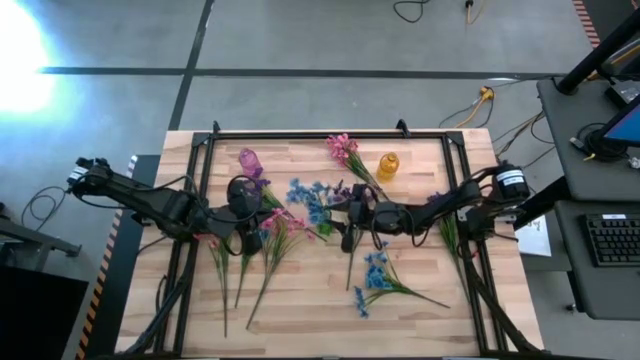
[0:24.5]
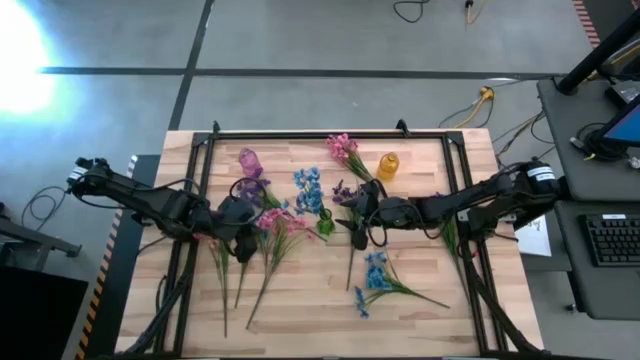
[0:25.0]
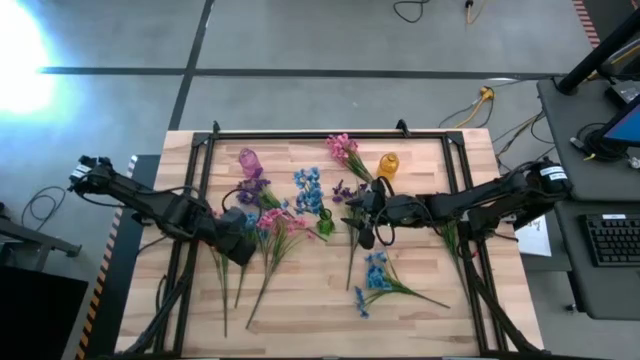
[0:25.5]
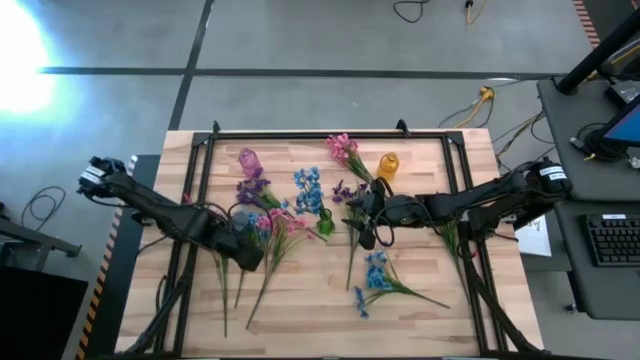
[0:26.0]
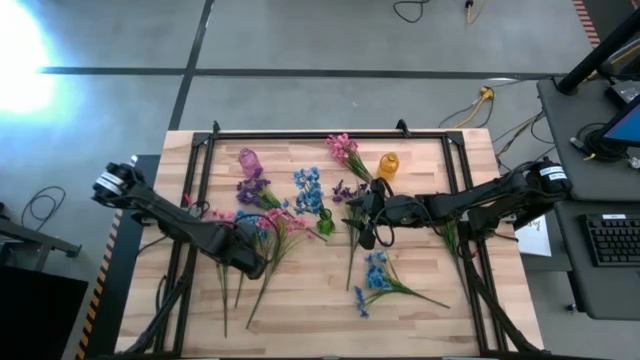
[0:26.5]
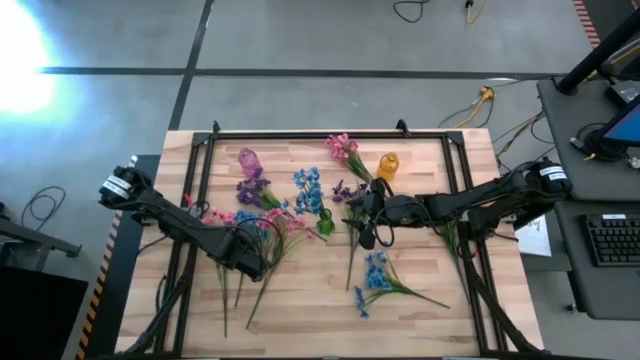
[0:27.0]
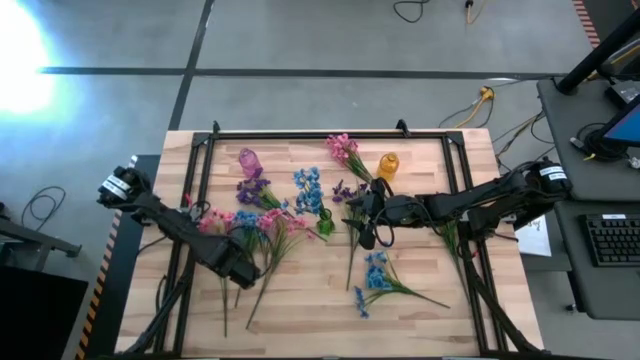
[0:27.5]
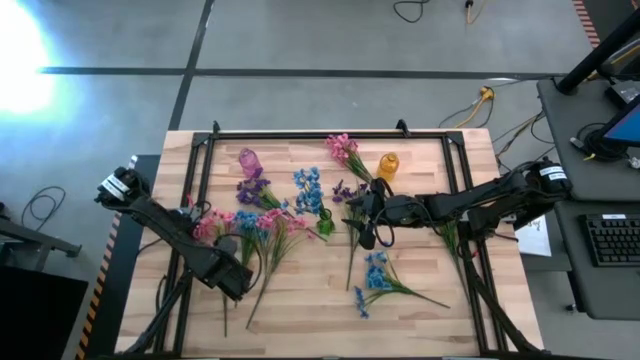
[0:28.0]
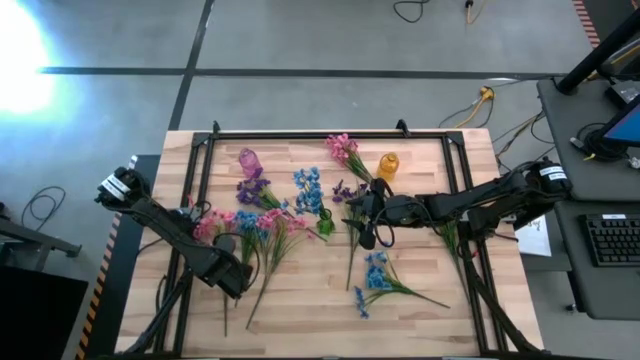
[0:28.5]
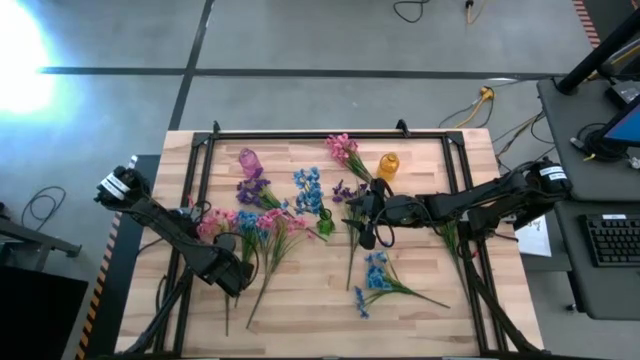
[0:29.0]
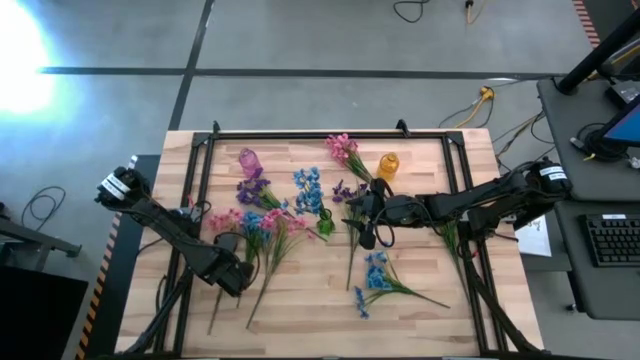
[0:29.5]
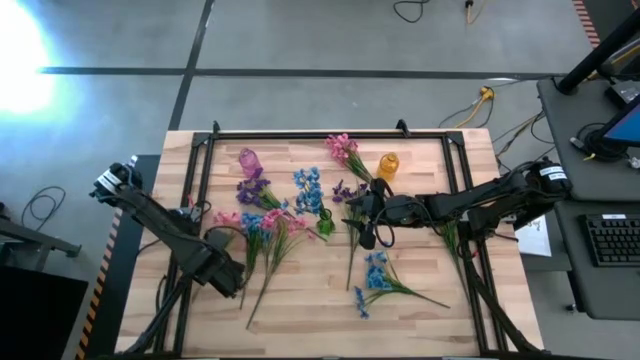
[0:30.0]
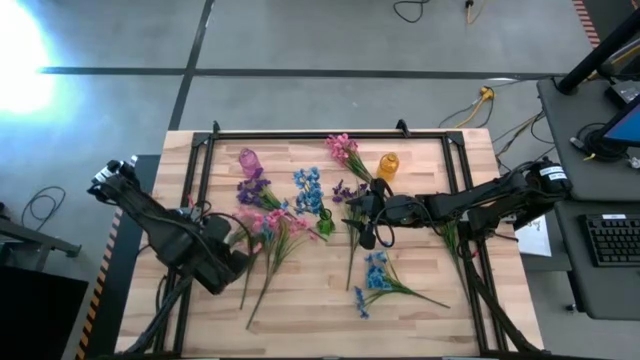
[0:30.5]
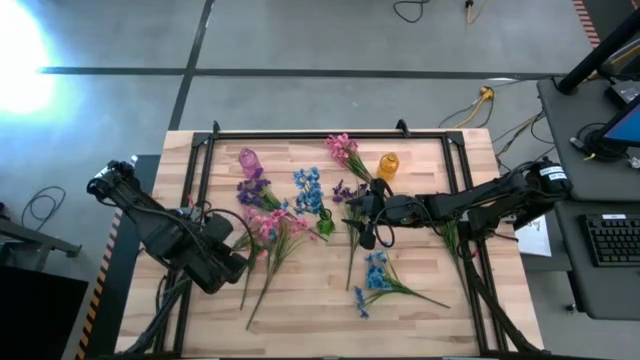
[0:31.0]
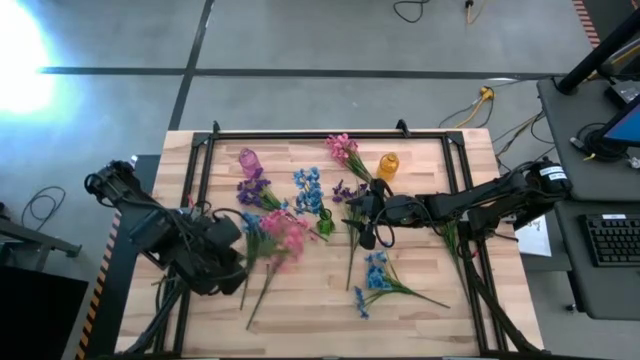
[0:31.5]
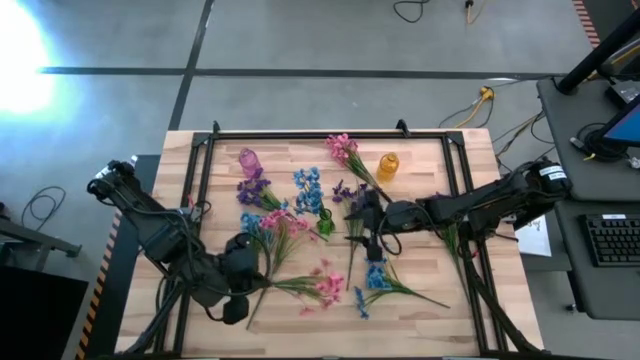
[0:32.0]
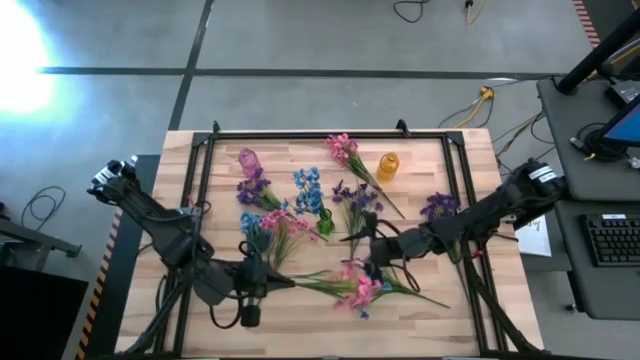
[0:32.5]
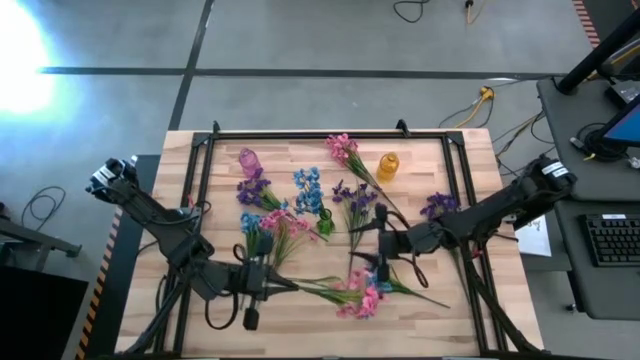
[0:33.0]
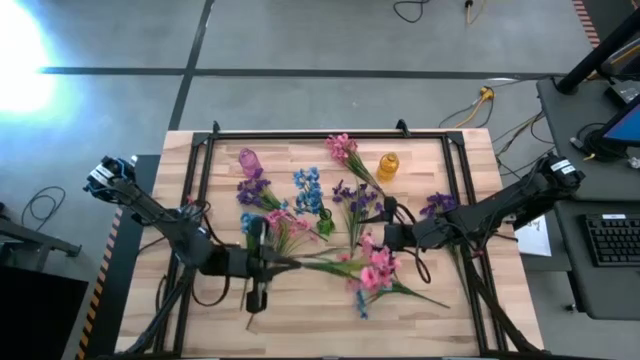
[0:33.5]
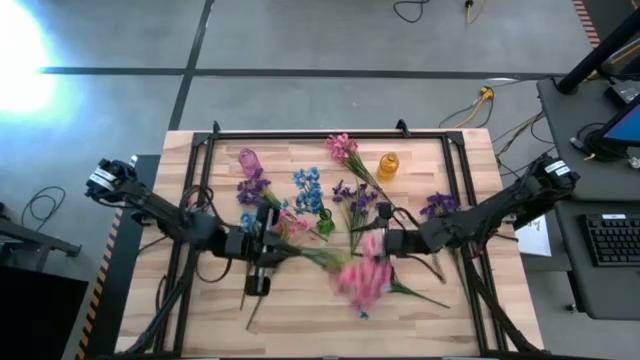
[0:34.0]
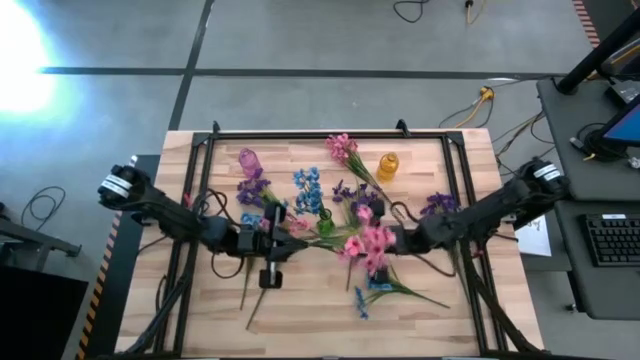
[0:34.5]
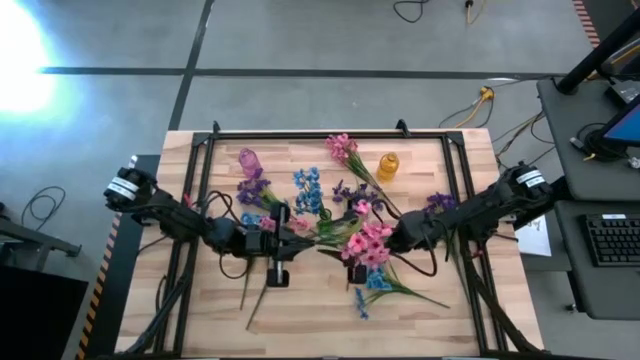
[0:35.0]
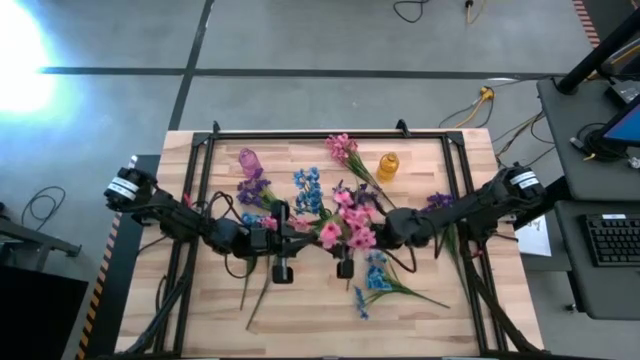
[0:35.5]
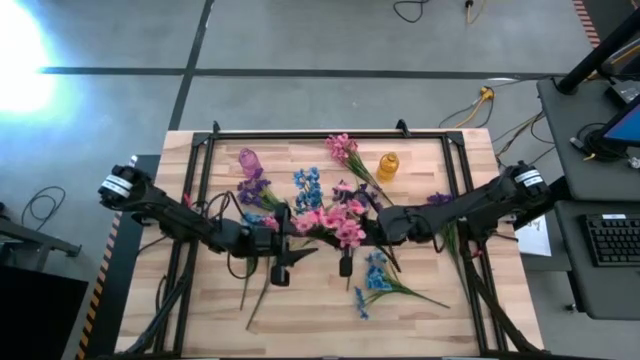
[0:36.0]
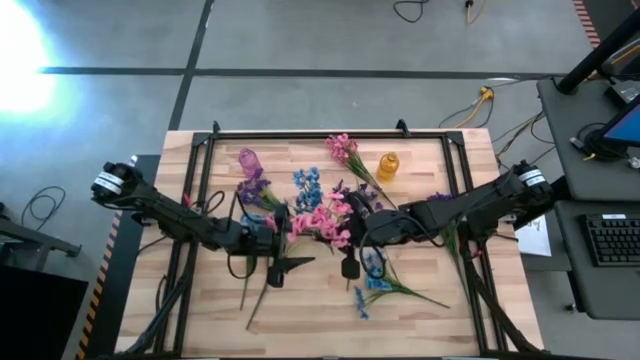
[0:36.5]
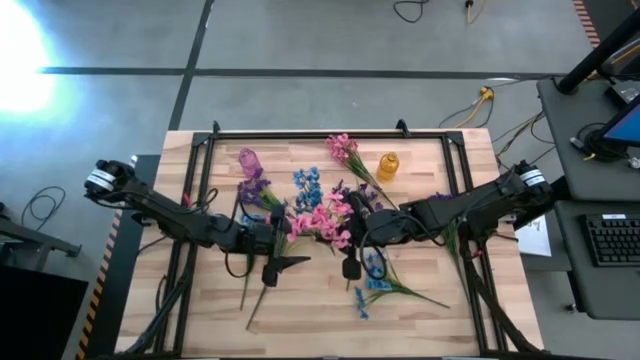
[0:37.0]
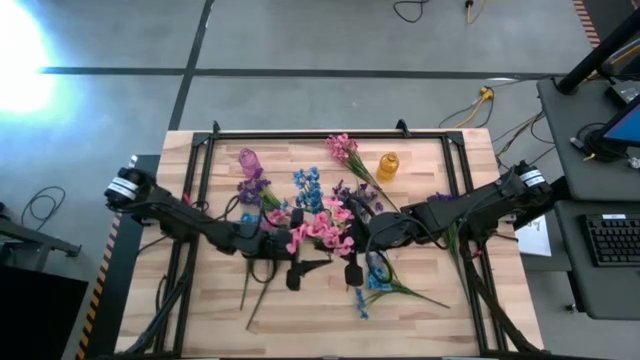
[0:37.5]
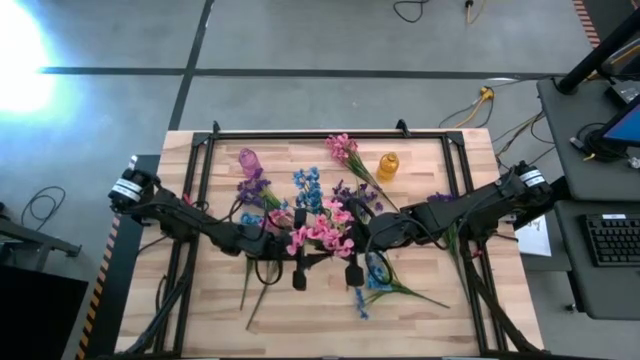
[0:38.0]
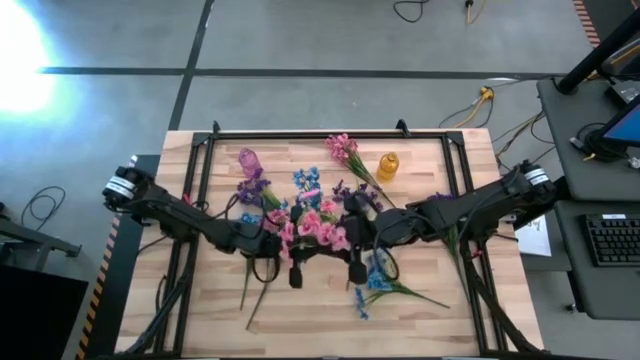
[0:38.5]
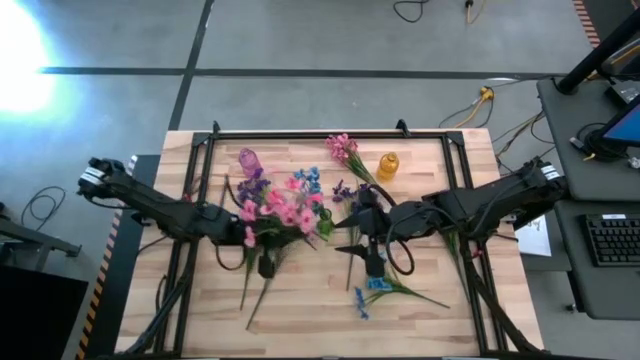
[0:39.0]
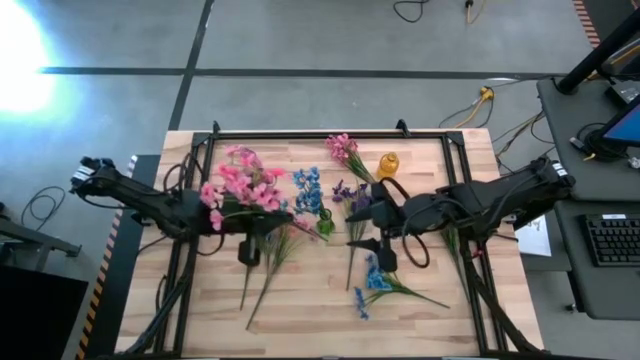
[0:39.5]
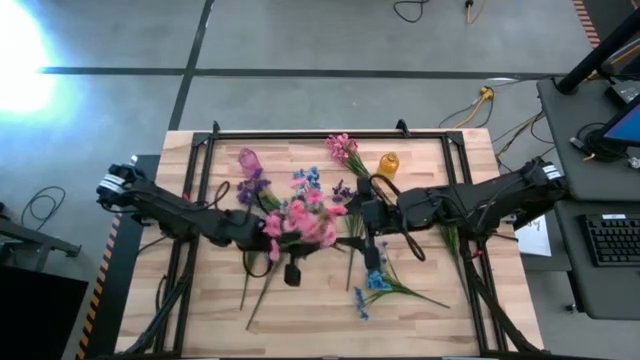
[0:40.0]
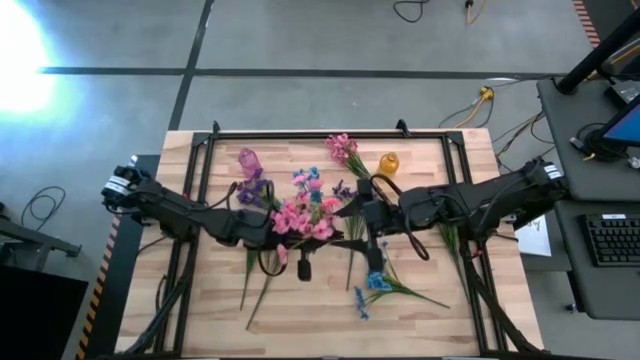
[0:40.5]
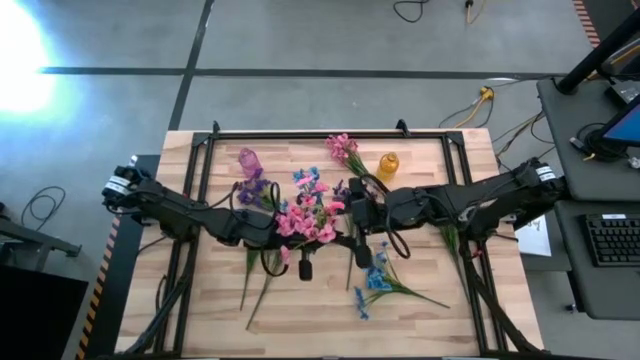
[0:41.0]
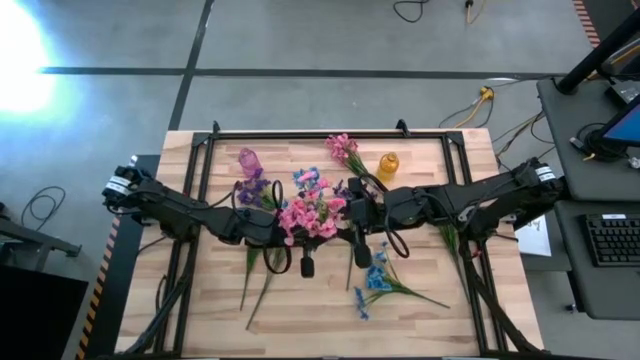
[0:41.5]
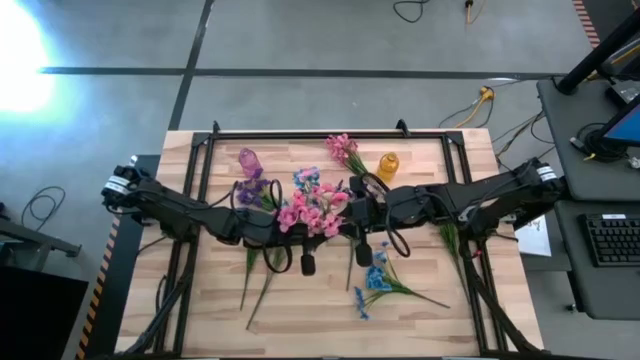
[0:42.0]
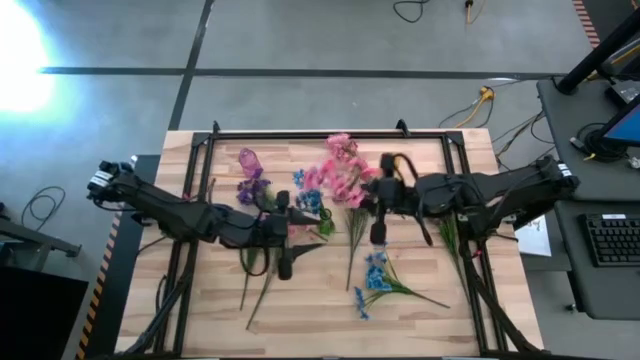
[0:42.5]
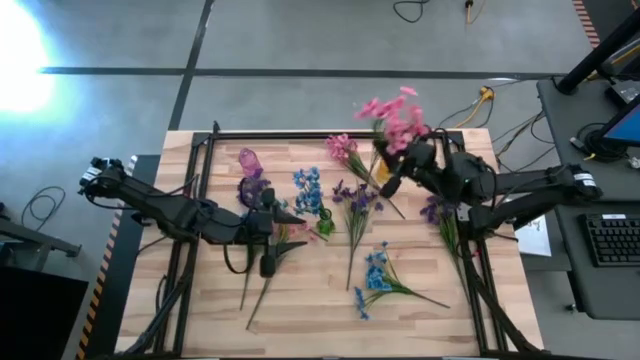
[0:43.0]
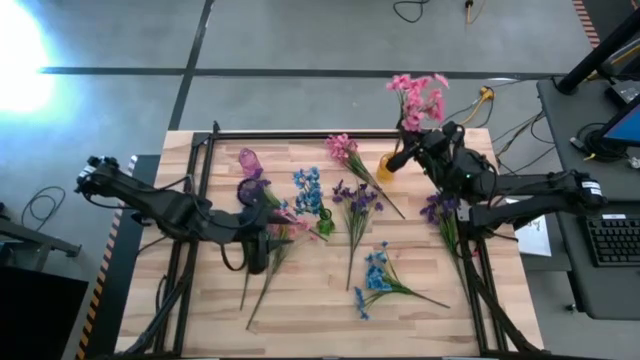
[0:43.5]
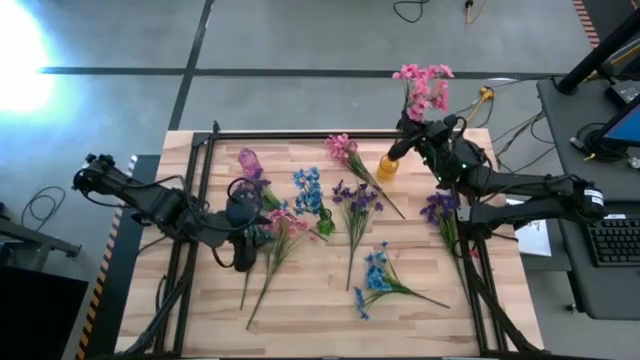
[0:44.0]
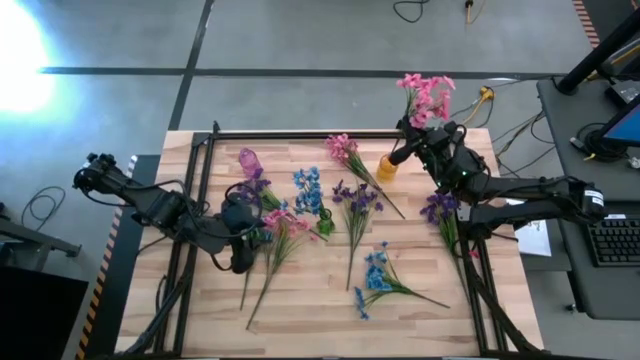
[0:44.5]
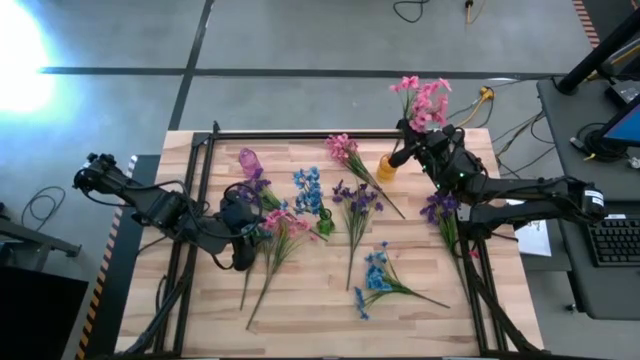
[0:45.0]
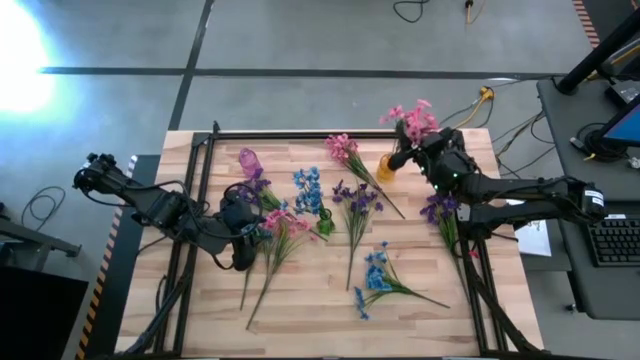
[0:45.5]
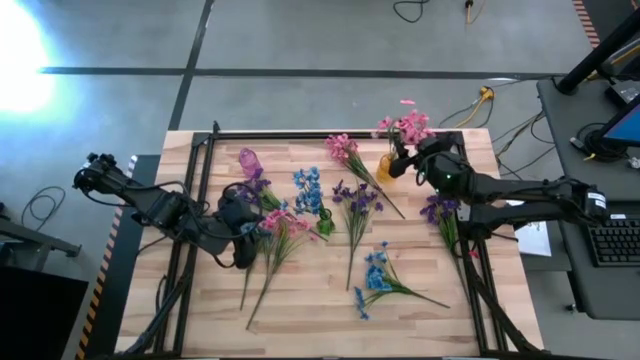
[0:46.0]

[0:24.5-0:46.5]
Task: Sort flowers into vase by color
Put the bottom left pink flowers into the yellow vase
